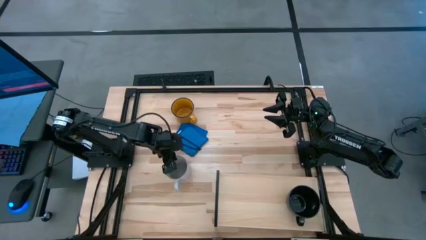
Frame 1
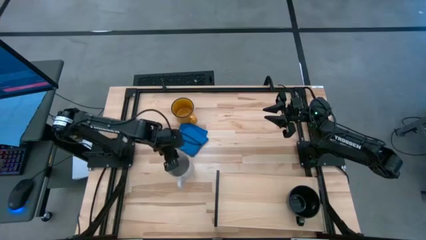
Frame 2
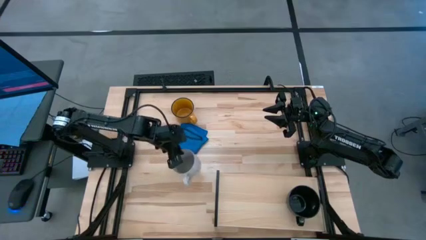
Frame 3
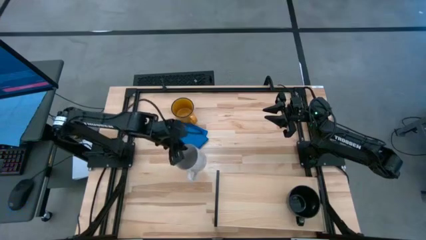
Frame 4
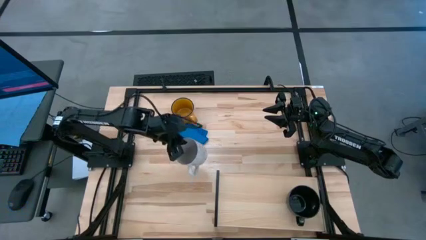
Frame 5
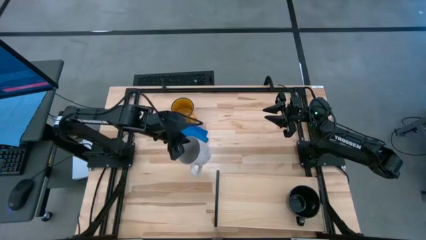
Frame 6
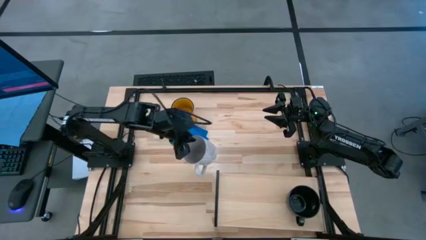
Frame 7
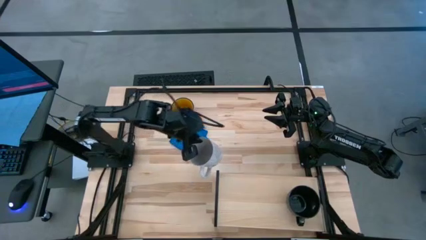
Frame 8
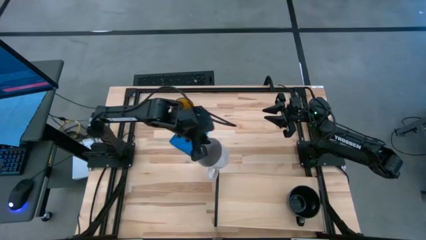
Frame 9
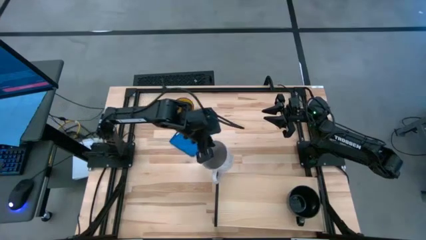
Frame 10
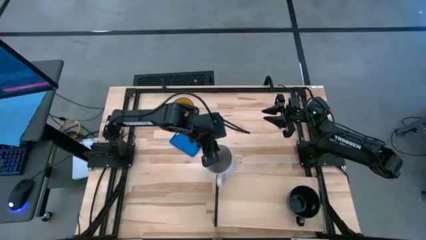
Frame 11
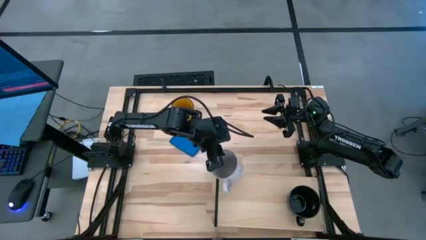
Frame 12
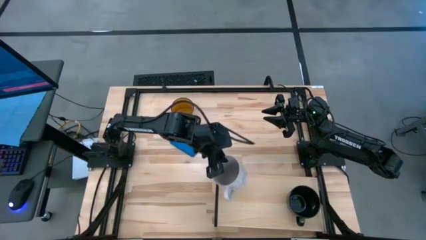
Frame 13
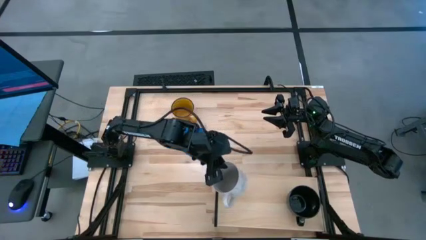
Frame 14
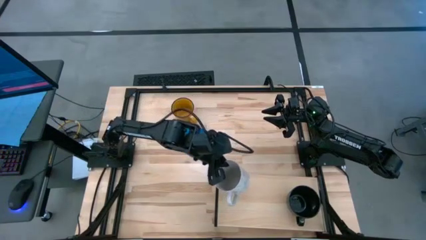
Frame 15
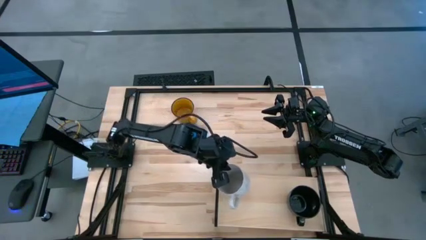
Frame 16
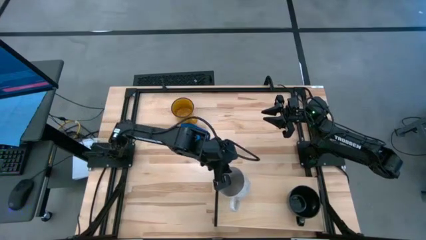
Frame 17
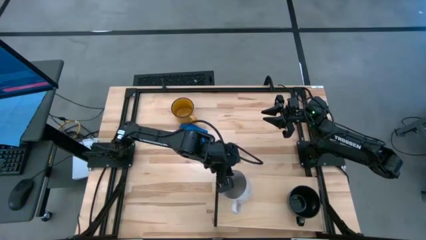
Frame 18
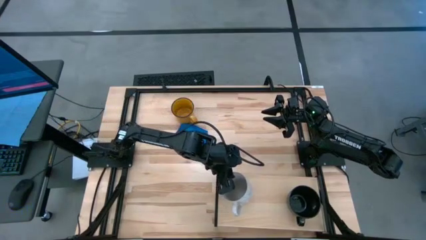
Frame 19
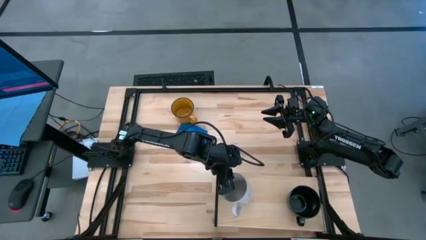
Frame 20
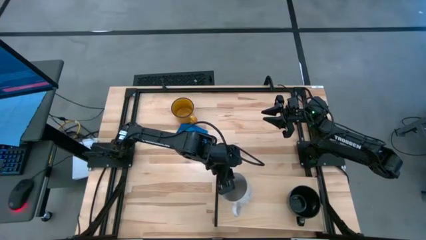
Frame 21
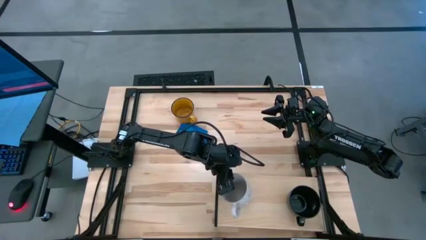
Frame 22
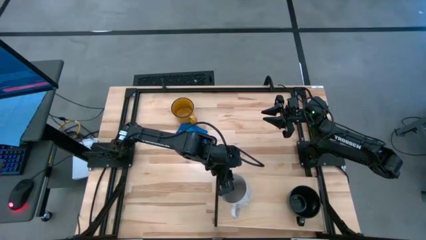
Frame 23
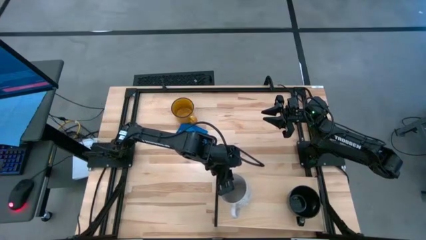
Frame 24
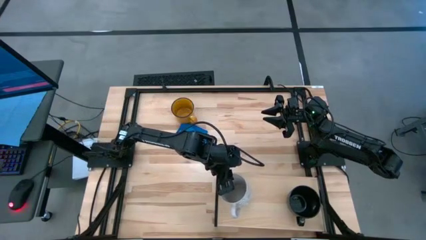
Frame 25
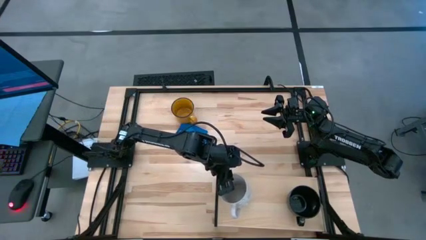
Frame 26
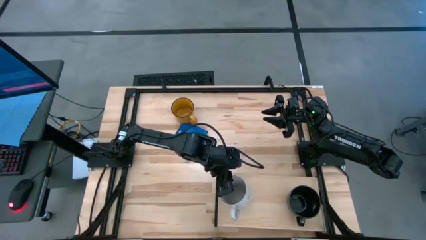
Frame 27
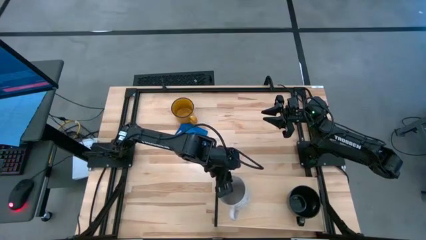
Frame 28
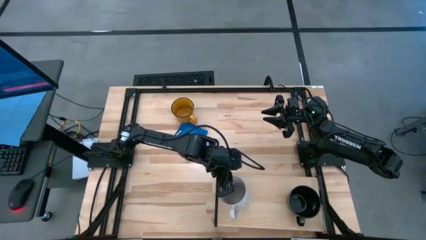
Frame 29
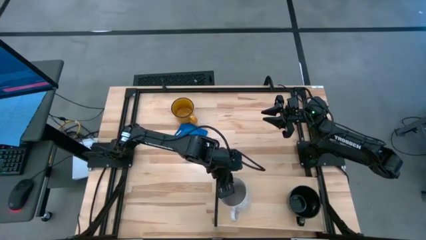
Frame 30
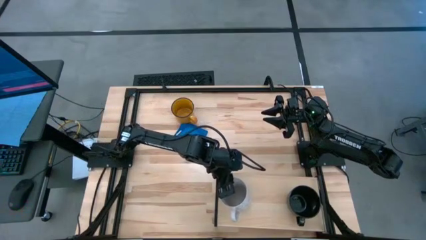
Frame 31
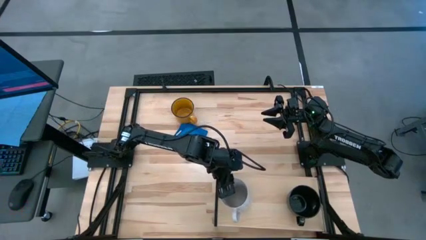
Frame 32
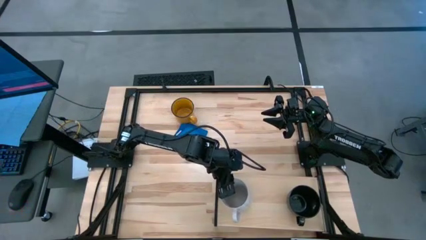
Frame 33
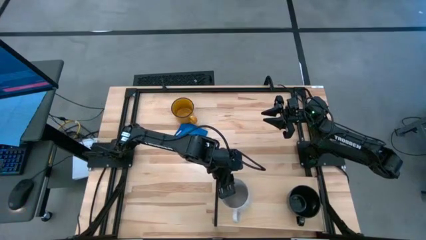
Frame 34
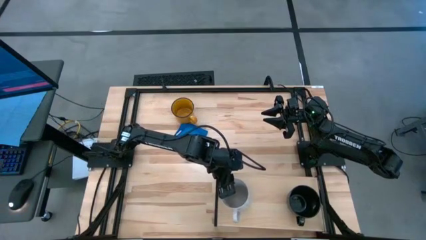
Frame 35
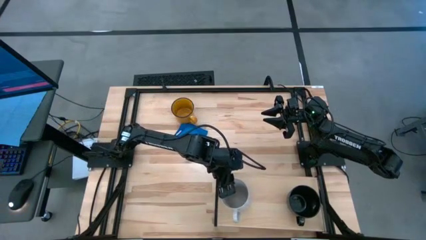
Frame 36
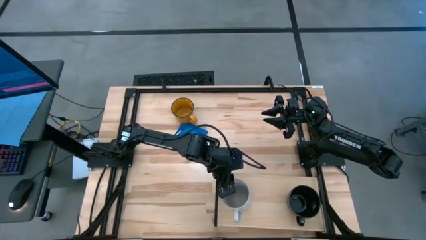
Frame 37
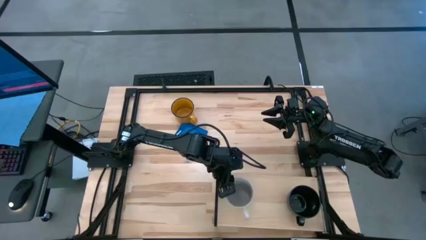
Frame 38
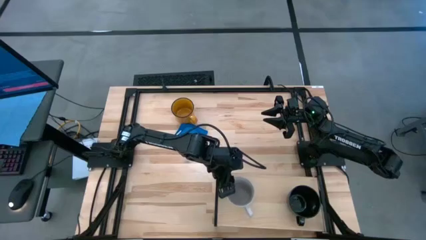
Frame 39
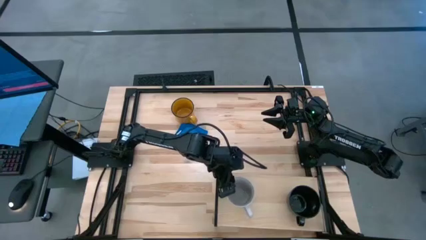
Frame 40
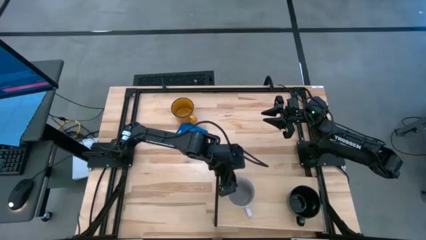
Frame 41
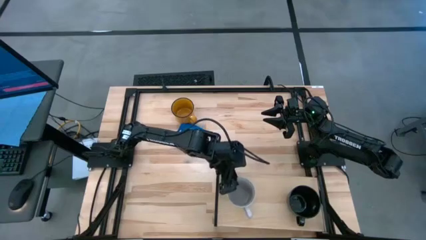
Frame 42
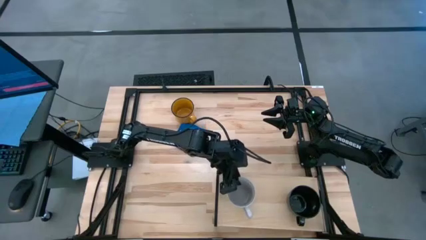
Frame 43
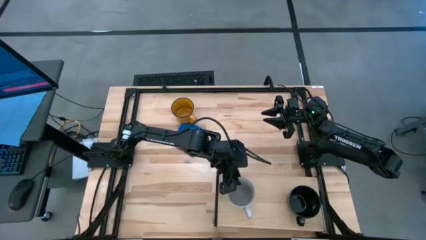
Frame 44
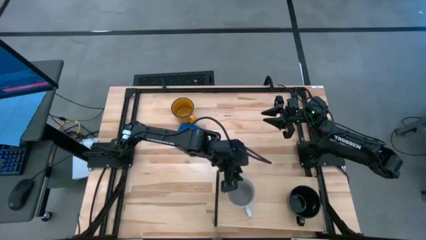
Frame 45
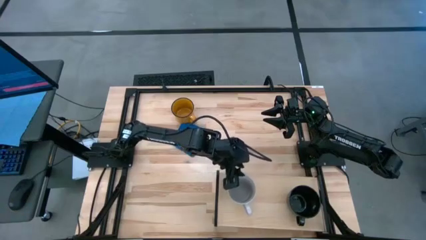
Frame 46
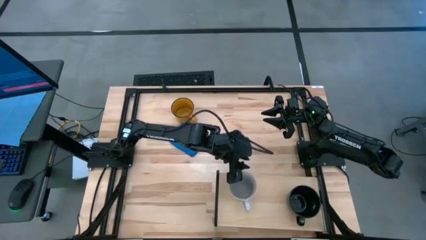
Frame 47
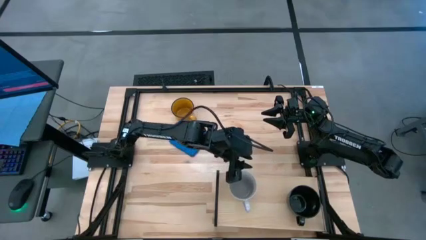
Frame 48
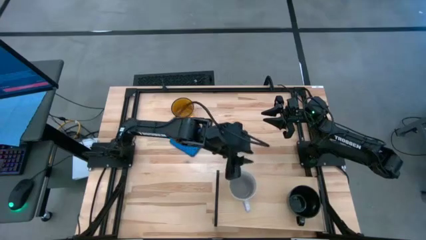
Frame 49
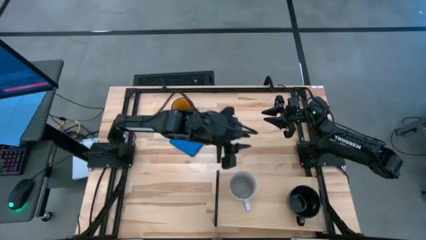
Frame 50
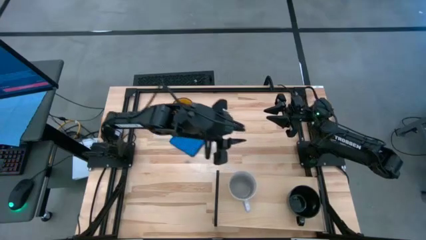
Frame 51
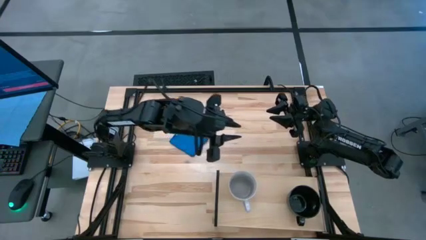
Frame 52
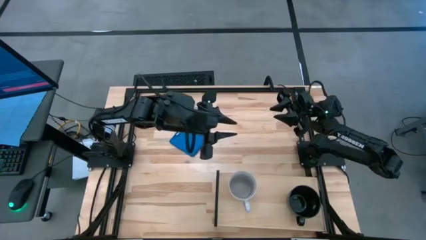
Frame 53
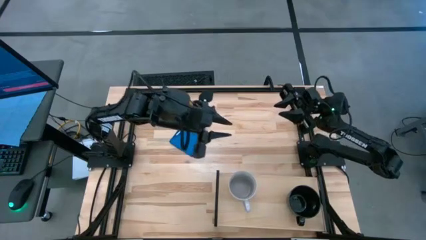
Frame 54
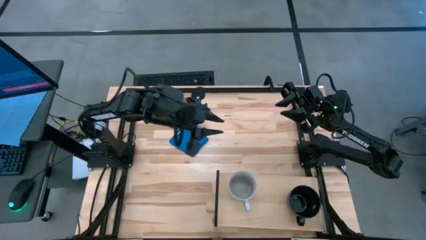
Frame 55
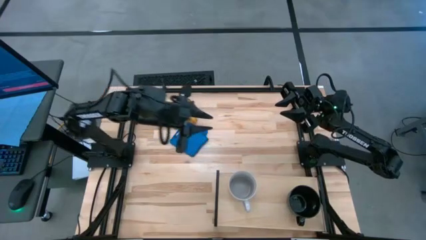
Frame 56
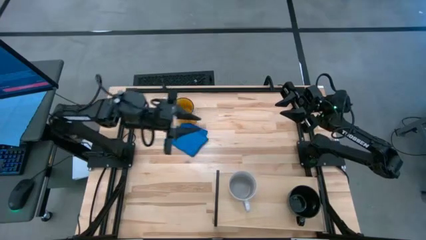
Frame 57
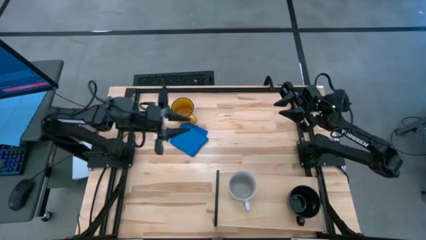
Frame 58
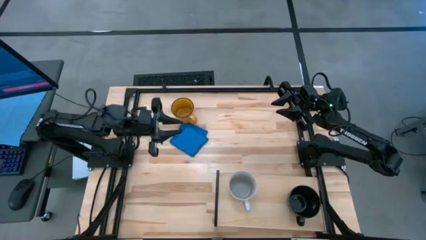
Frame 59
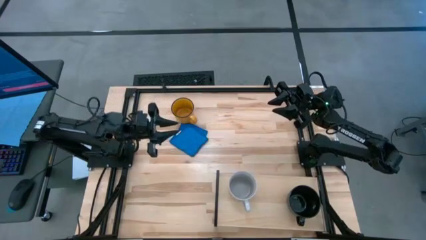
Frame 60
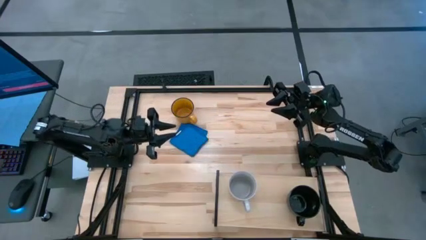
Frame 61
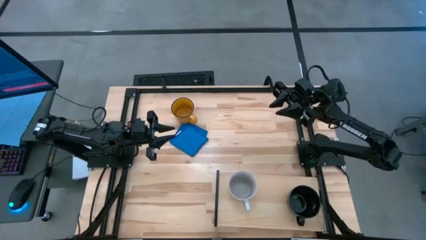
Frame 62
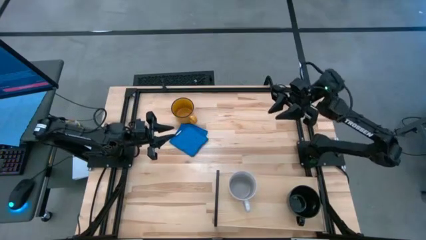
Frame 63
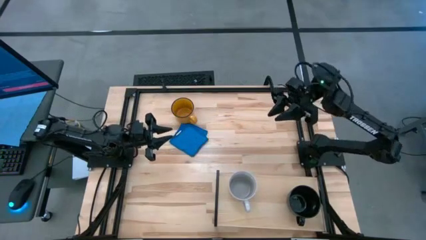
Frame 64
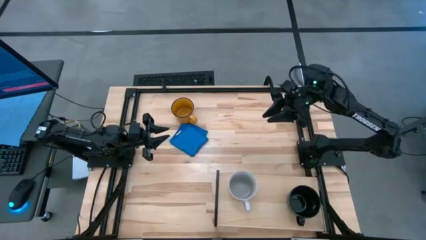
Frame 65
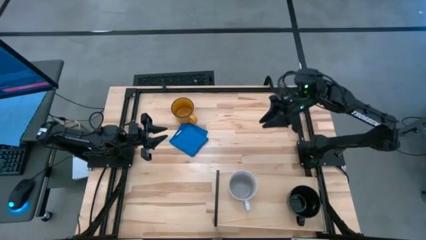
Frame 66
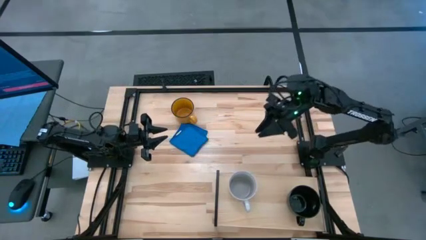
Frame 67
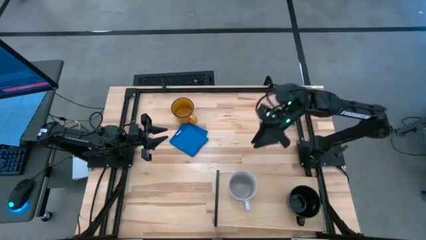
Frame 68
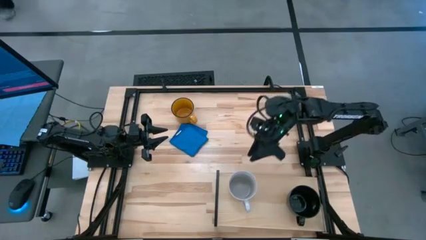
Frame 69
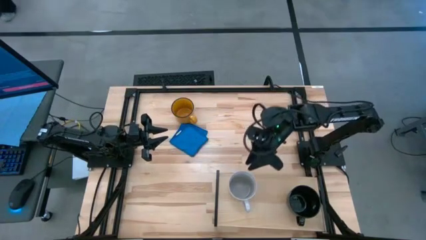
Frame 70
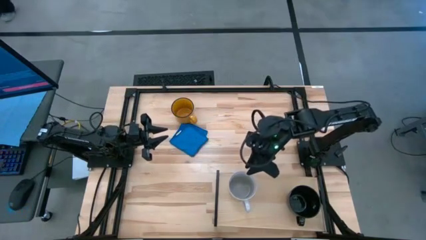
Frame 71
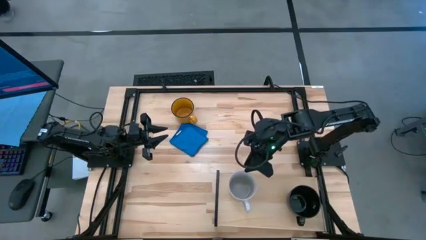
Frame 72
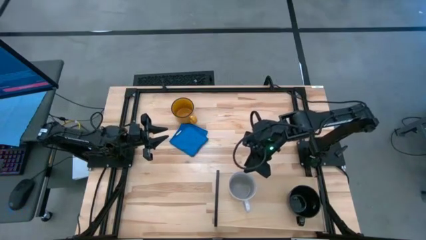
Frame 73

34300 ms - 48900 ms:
Task: Stack small to large cups/mugs on shelf
Put the gray mug on the shelf
